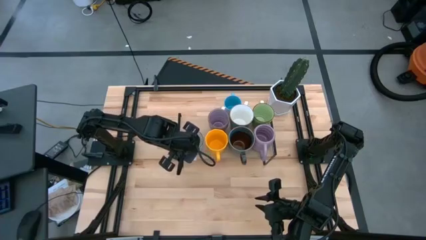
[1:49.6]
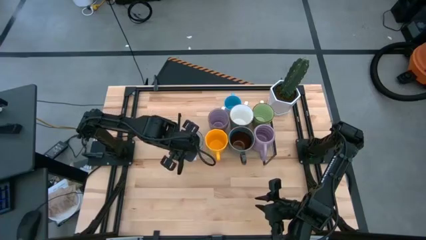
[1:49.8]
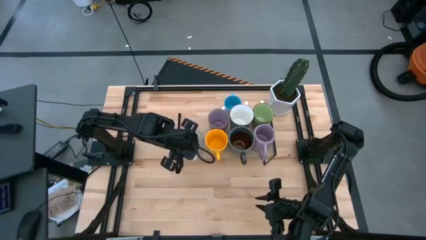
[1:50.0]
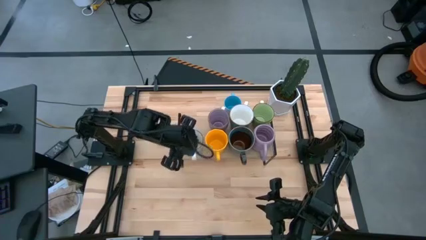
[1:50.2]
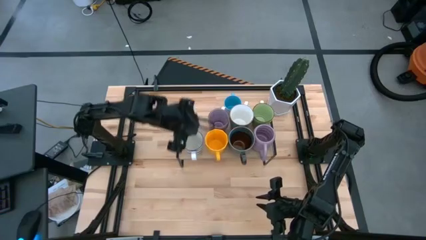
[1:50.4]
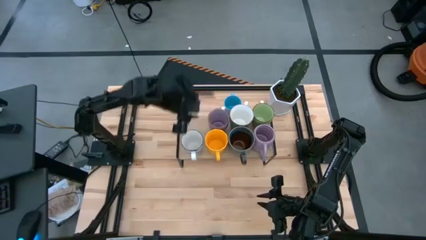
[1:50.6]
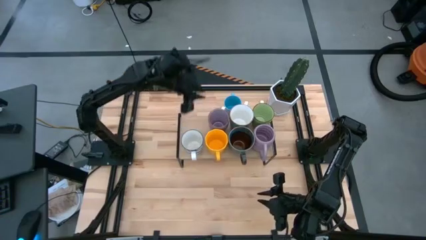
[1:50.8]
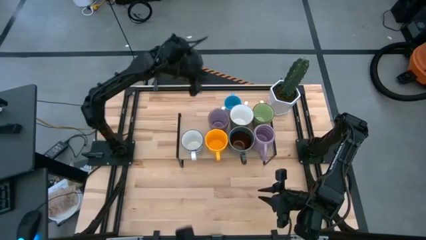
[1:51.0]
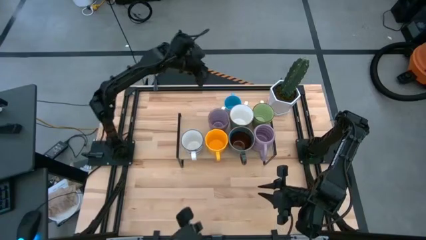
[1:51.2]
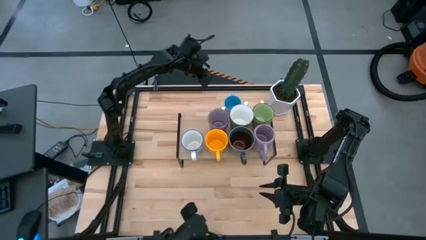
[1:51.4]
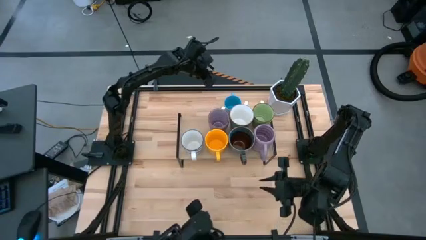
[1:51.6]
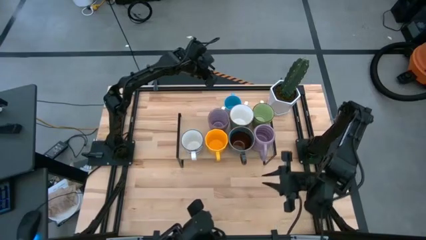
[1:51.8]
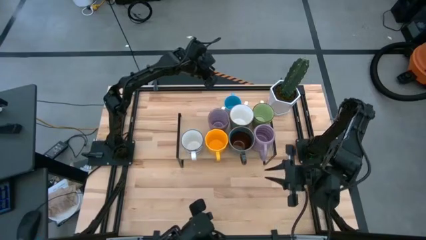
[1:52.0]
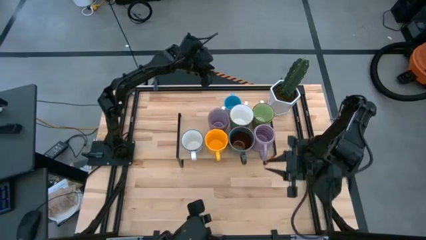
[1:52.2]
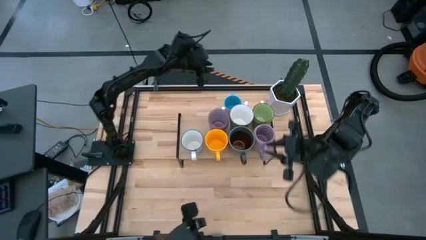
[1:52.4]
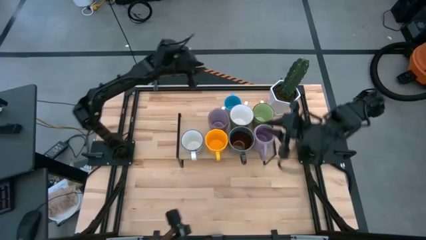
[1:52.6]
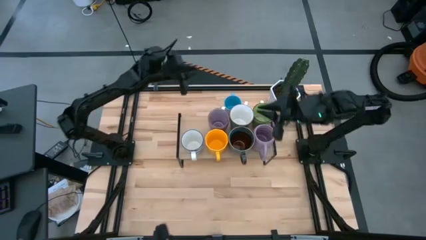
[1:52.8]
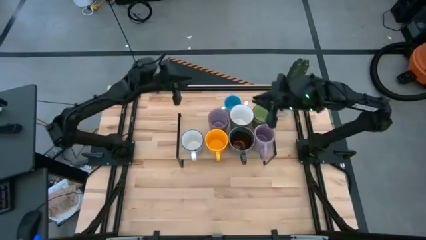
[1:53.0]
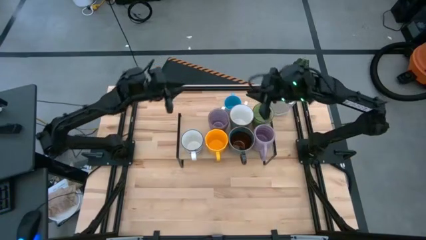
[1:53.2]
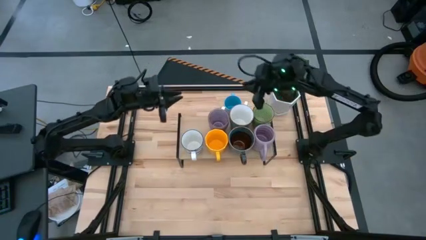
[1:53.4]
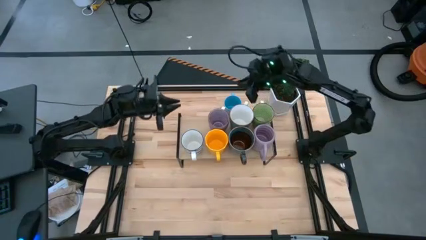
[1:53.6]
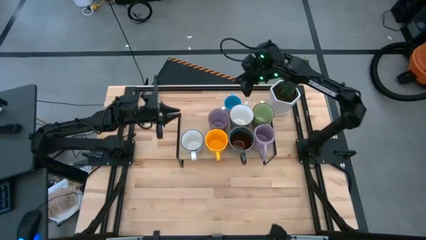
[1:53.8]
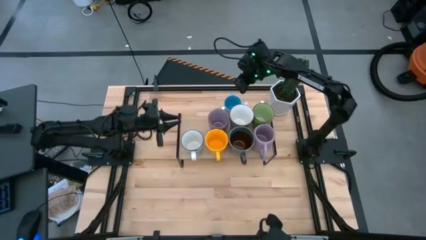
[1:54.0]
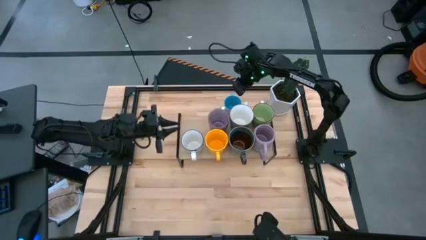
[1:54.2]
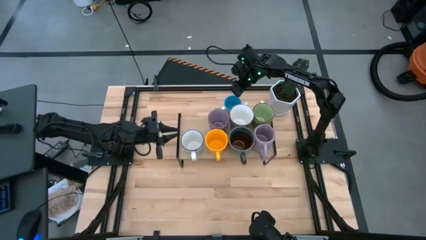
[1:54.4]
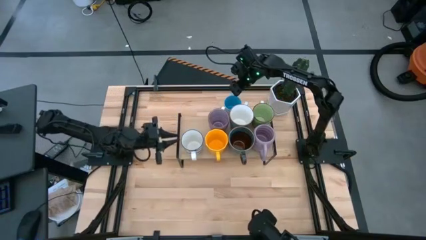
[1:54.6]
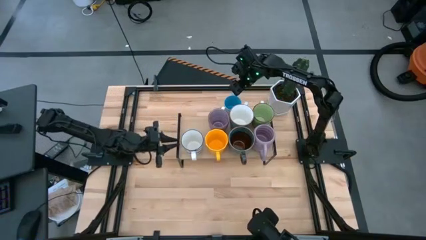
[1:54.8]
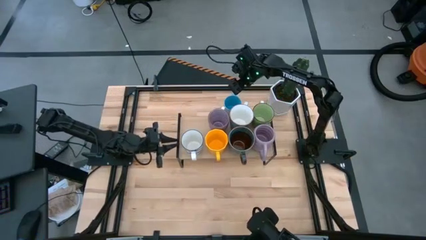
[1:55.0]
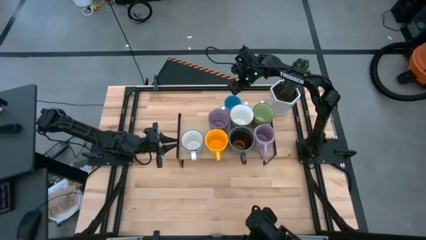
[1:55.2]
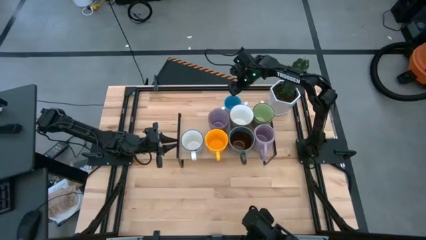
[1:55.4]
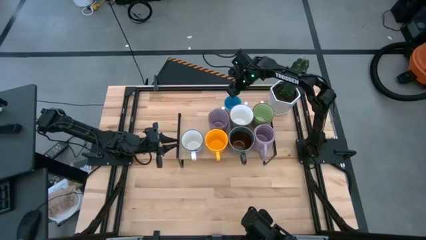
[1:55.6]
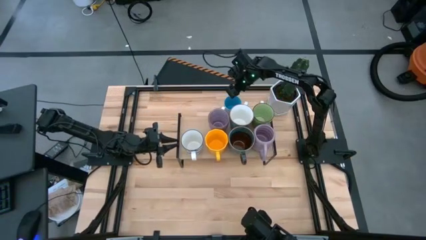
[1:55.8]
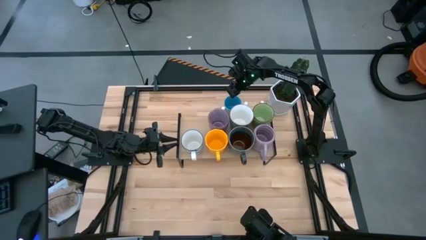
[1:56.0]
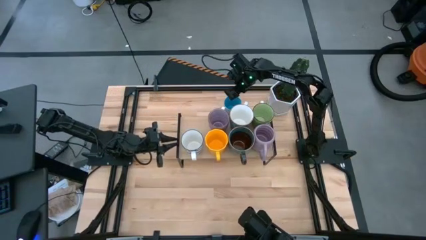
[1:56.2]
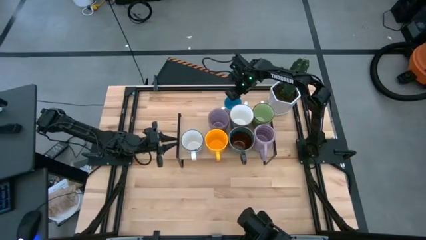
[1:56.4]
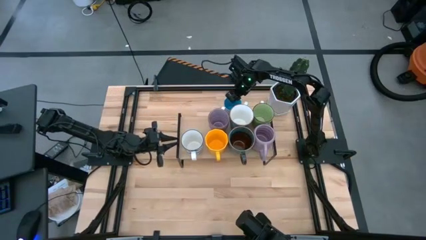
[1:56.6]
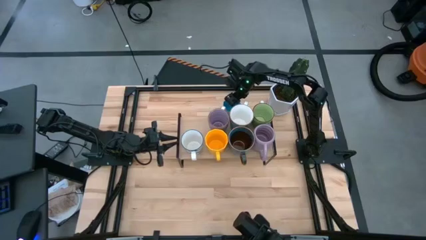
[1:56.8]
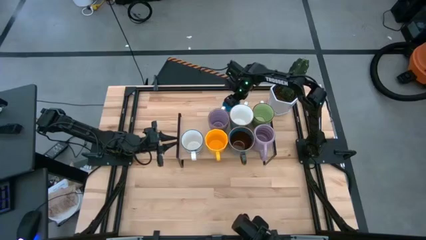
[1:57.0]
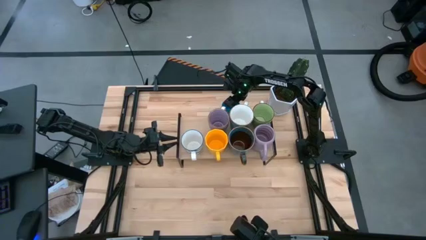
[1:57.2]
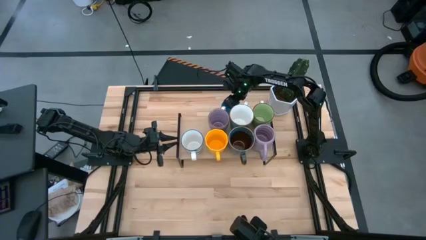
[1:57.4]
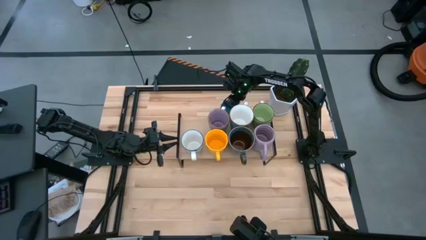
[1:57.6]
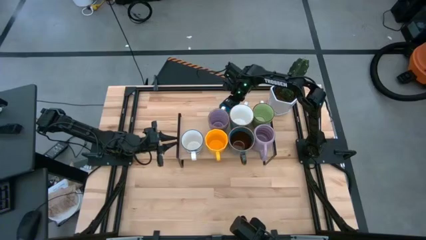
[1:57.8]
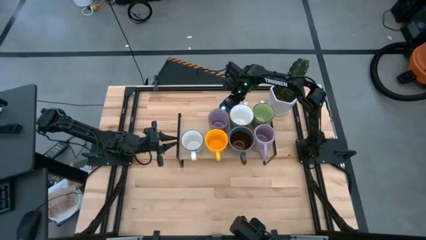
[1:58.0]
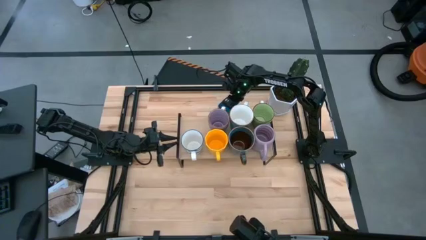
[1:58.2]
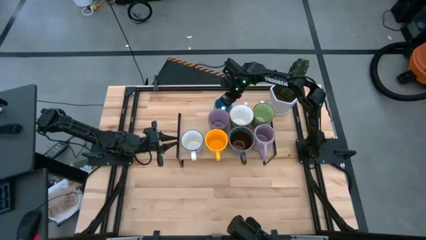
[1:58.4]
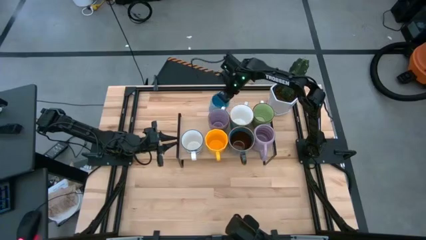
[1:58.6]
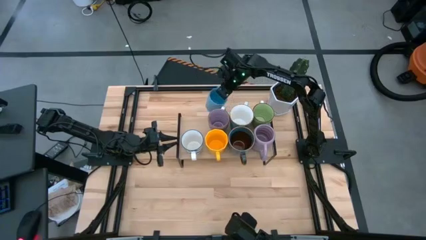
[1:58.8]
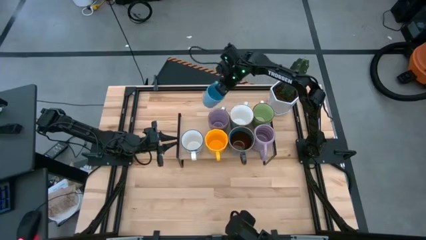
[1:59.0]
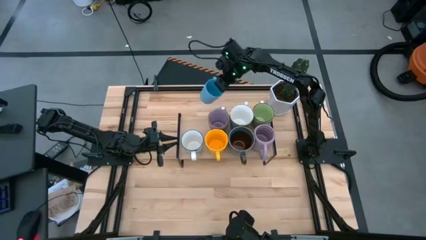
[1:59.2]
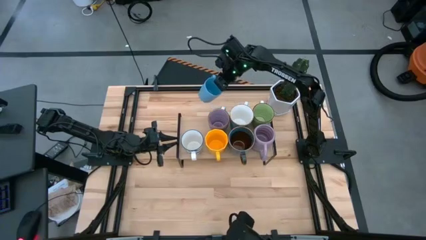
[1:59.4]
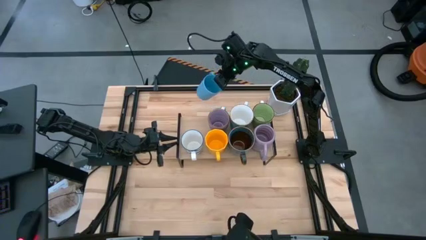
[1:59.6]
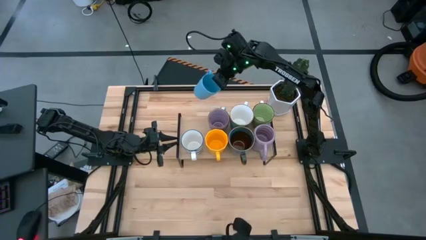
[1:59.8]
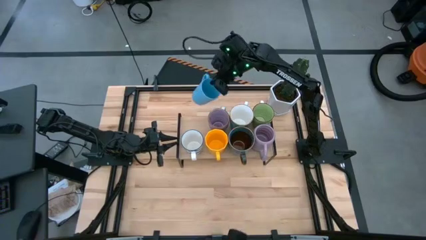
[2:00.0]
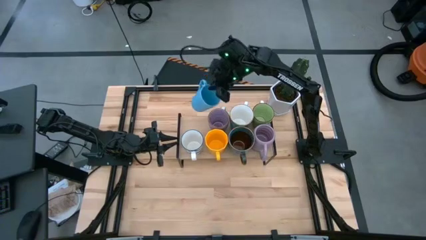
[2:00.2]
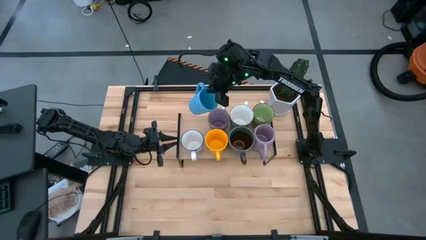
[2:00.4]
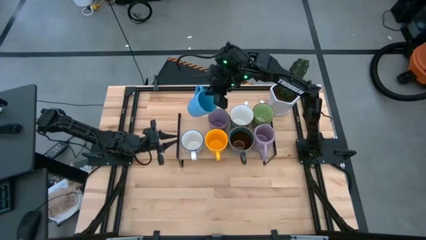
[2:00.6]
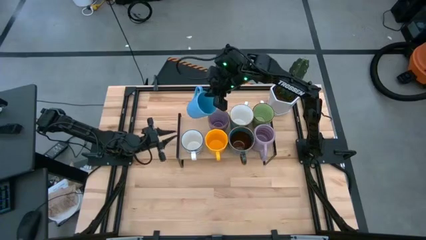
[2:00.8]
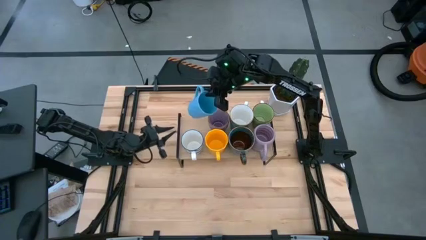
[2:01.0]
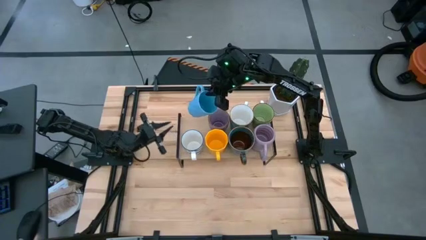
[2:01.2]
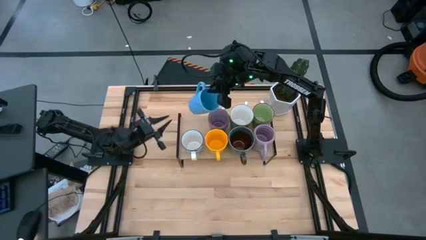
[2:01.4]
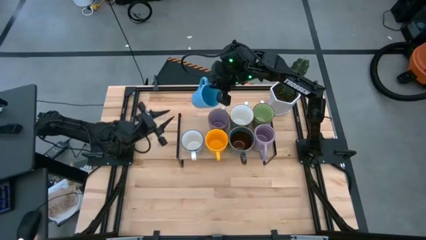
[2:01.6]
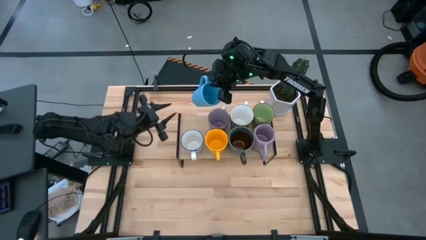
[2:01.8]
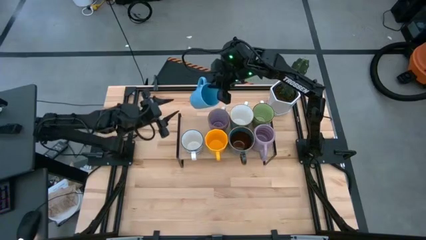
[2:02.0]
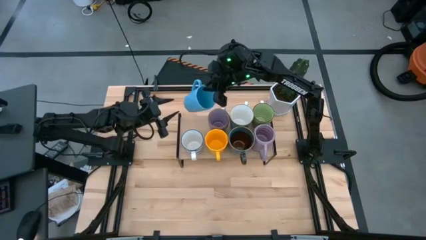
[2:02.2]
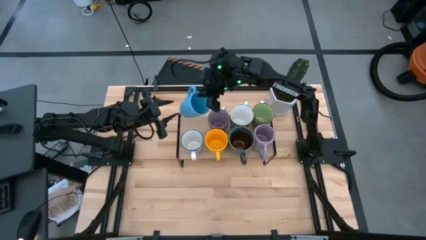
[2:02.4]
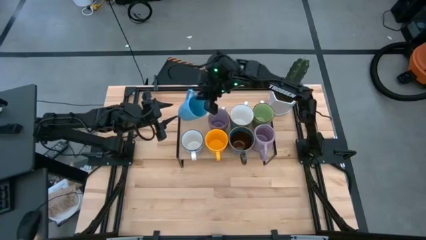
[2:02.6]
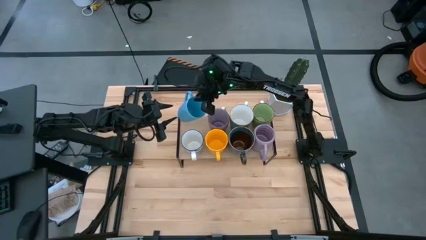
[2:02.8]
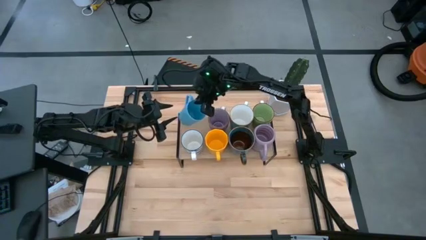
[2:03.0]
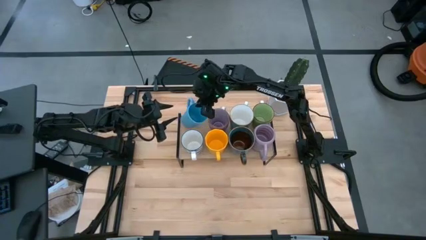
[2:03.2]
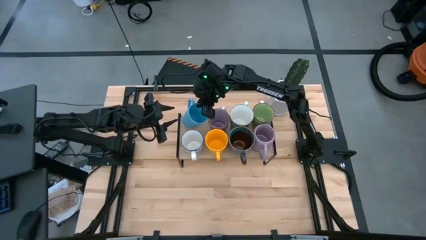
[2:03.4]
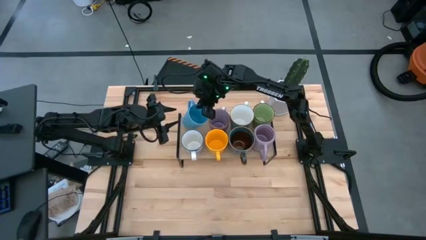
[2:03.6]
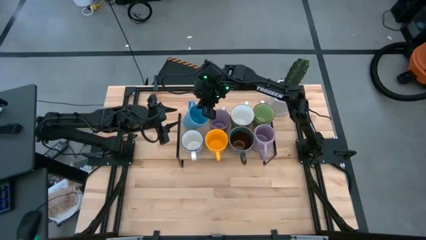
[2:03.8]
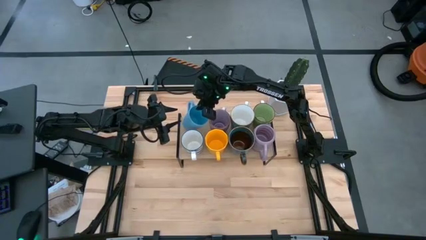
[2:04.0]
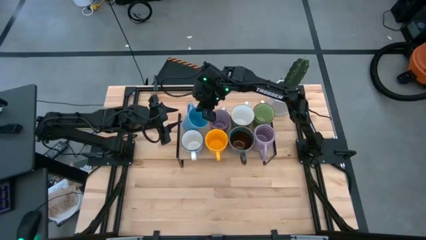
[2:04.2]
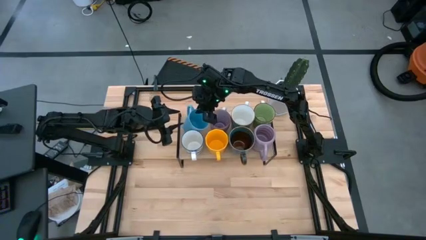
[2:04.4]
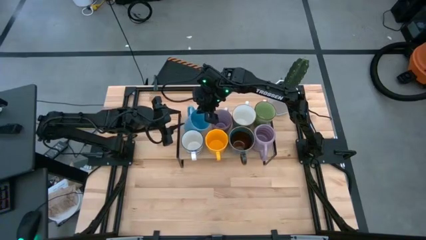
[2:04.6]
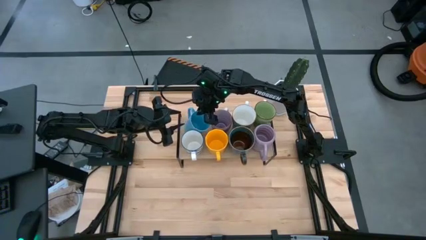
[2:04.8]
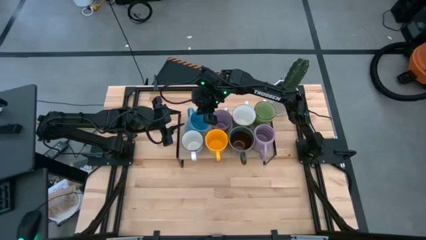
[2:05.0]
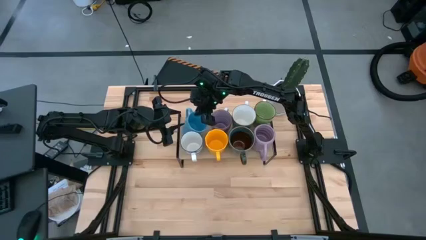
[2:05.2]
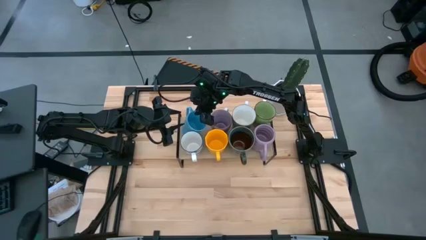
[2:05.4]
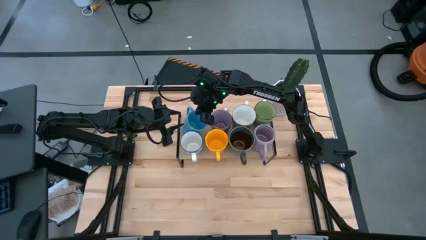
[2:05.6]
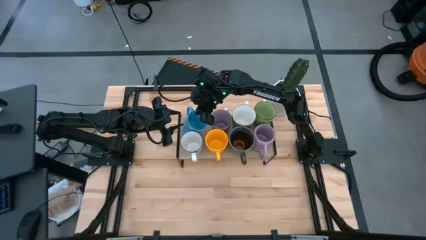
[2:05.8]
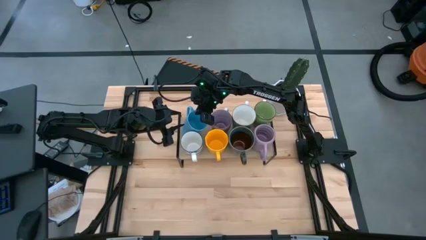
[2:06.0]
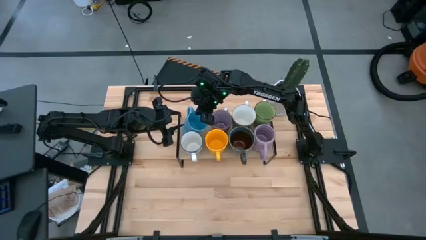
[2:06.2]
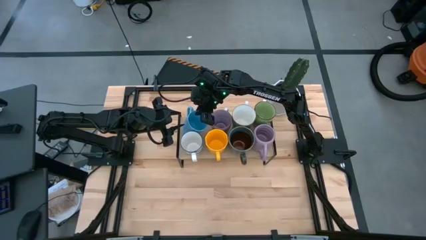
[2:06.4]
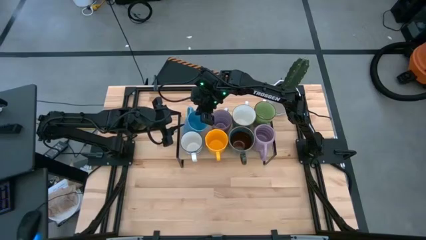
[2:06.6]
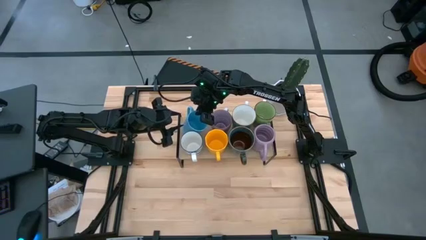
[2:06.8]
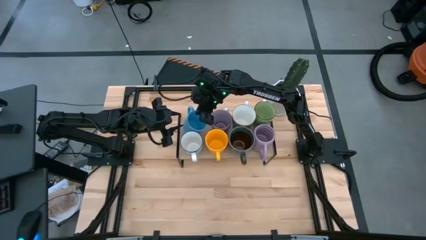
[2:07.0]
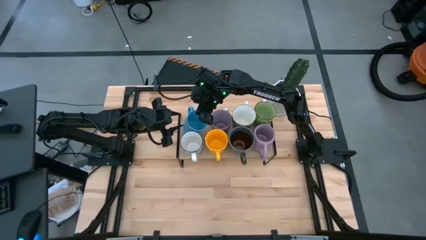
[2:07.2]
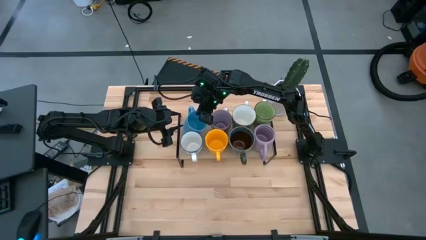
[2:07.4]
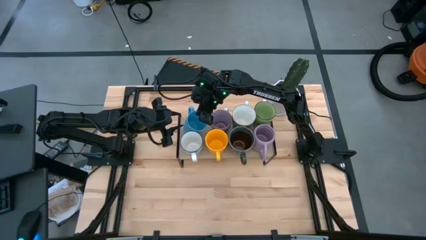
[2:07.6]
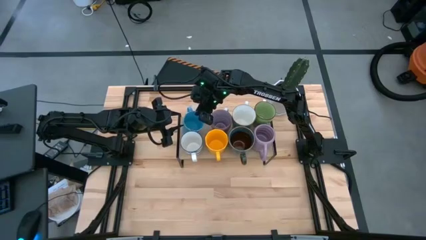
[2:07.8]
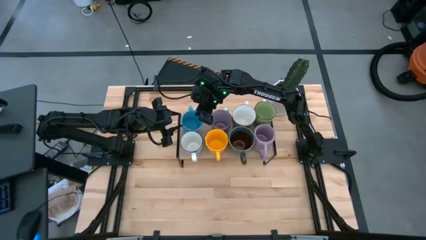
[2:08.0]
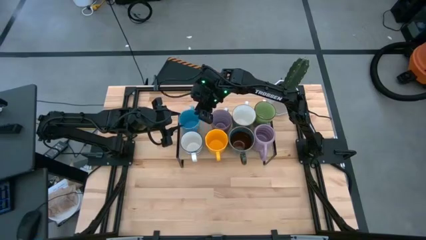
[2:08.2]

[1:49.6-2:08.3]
Task: Place coffee mugs
Put the blue mug on the shelf
